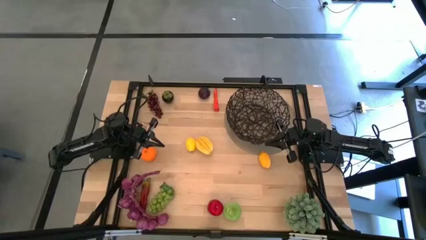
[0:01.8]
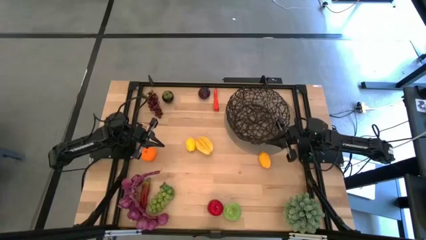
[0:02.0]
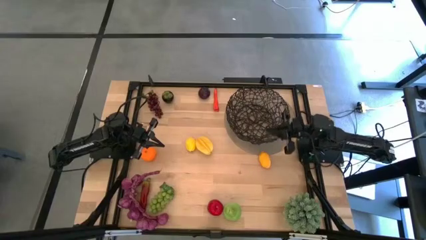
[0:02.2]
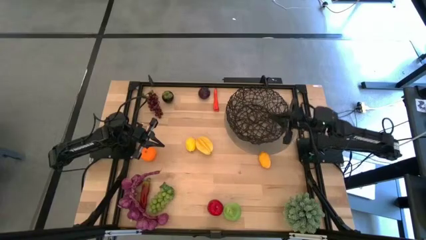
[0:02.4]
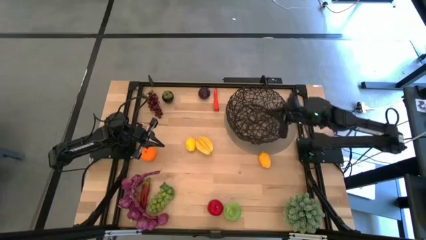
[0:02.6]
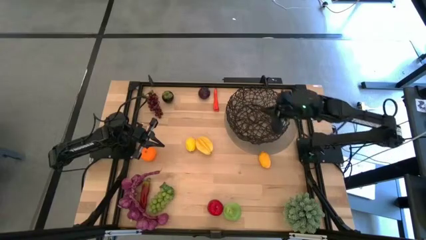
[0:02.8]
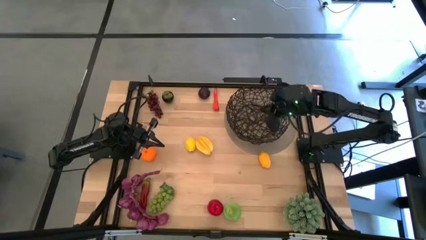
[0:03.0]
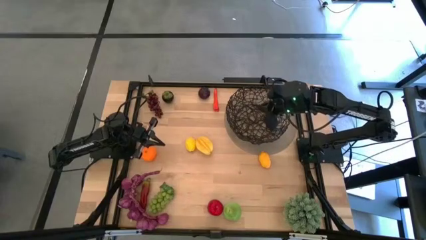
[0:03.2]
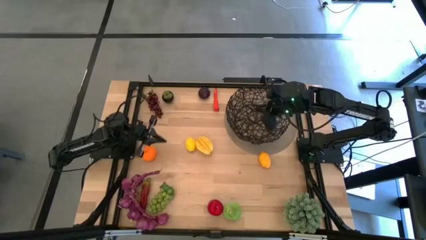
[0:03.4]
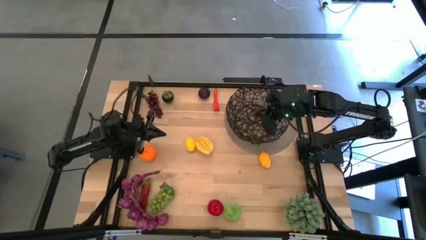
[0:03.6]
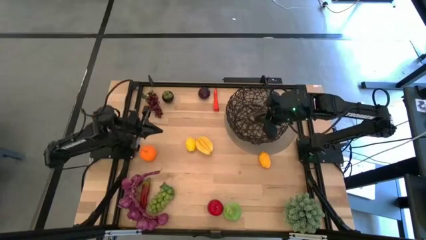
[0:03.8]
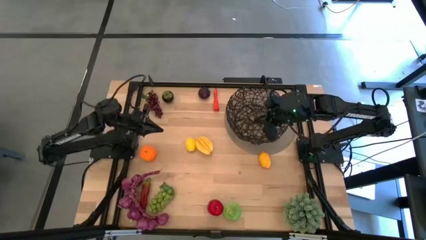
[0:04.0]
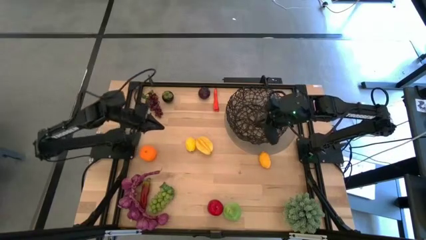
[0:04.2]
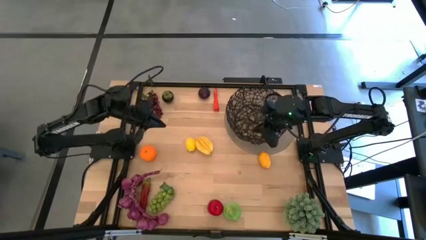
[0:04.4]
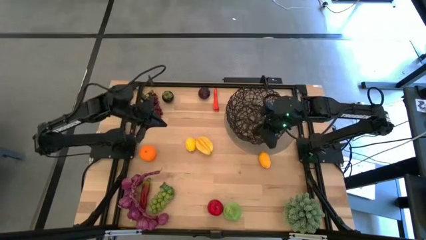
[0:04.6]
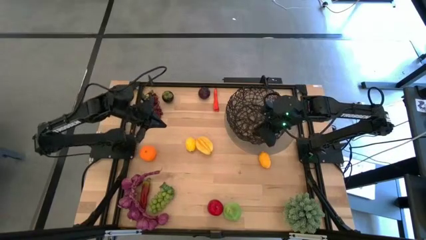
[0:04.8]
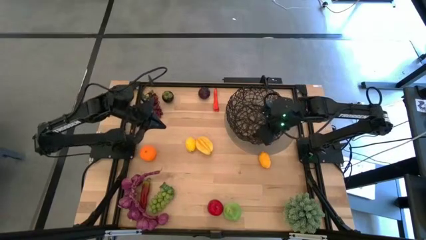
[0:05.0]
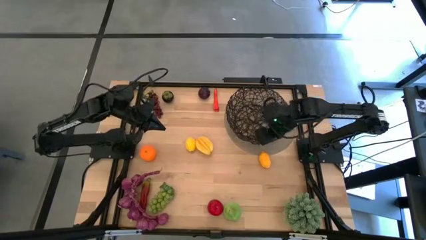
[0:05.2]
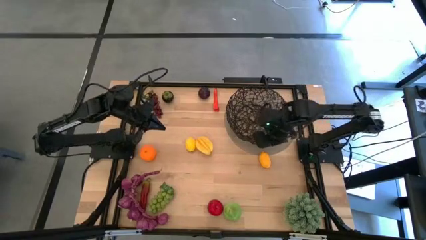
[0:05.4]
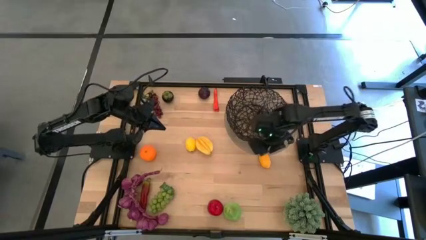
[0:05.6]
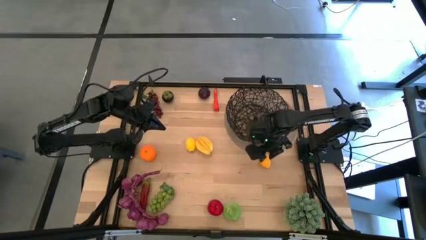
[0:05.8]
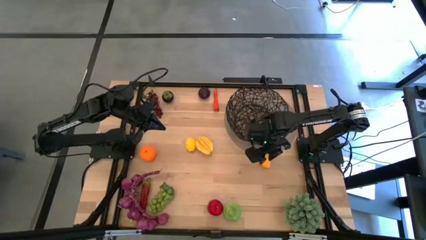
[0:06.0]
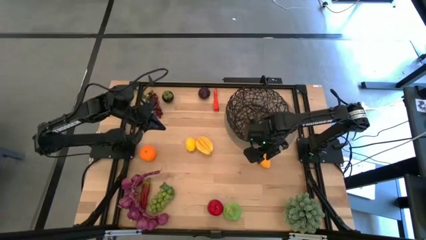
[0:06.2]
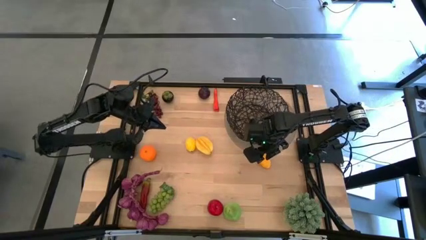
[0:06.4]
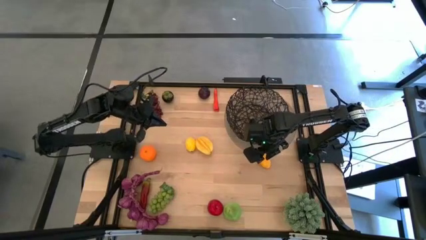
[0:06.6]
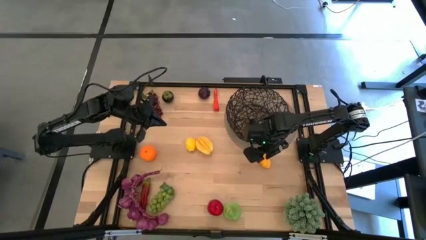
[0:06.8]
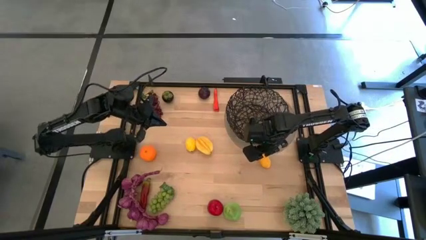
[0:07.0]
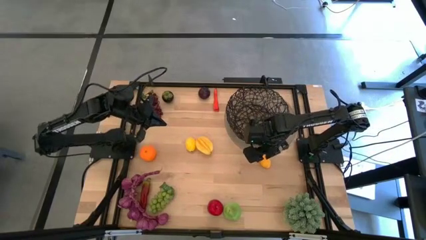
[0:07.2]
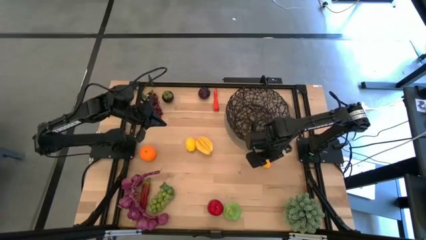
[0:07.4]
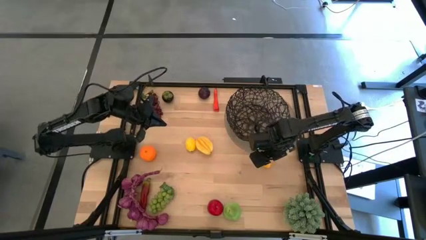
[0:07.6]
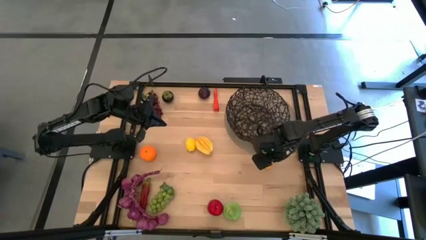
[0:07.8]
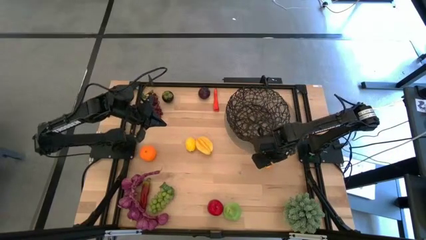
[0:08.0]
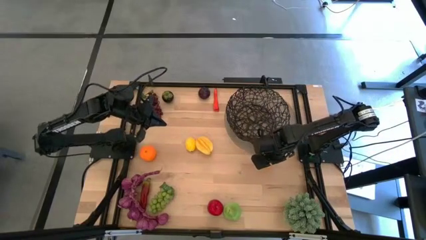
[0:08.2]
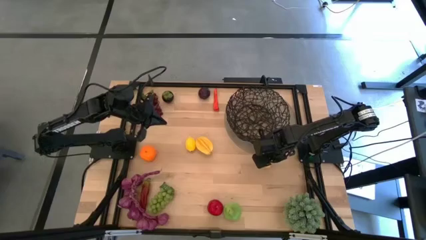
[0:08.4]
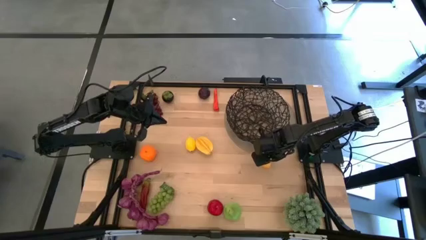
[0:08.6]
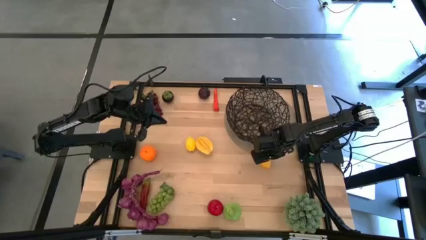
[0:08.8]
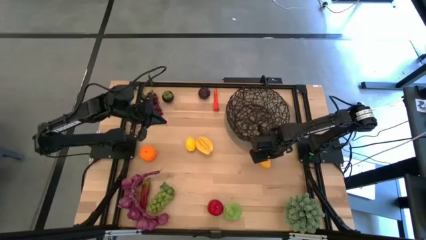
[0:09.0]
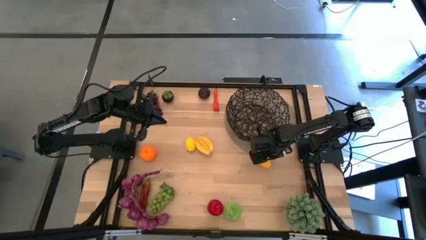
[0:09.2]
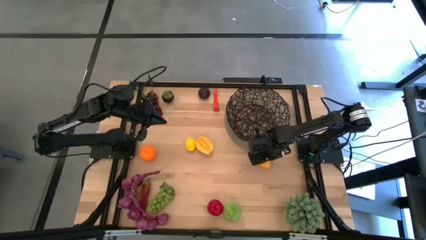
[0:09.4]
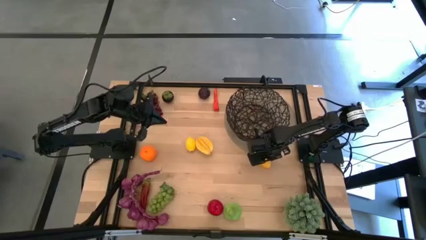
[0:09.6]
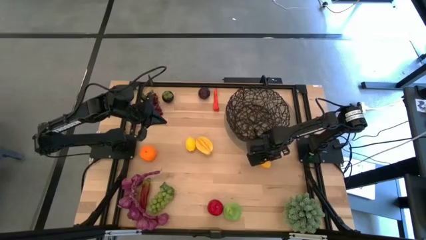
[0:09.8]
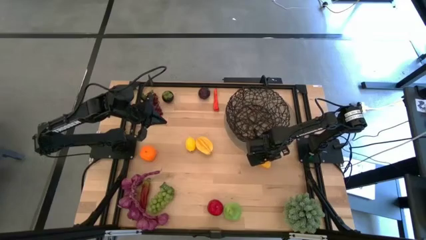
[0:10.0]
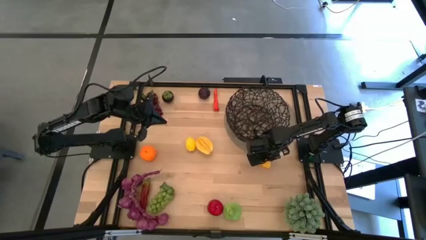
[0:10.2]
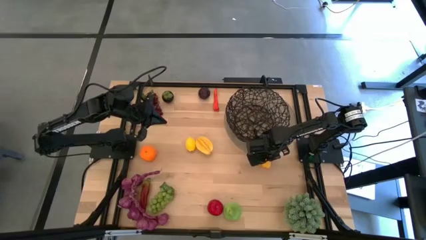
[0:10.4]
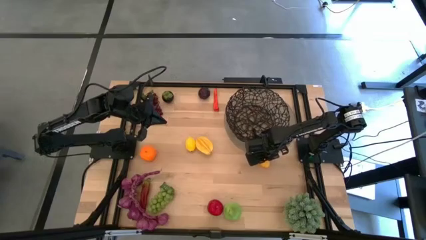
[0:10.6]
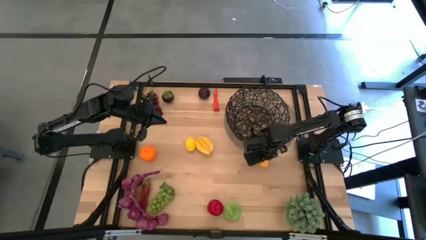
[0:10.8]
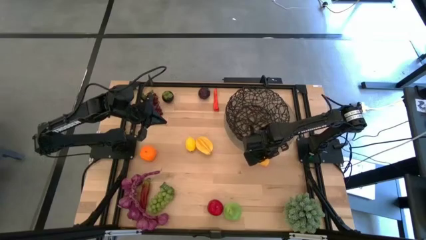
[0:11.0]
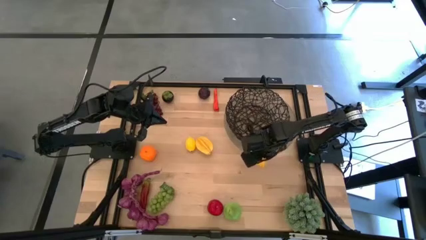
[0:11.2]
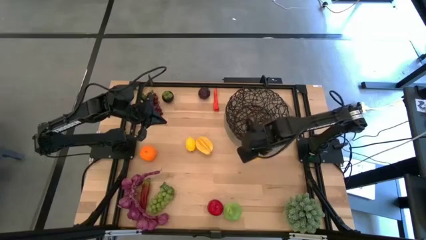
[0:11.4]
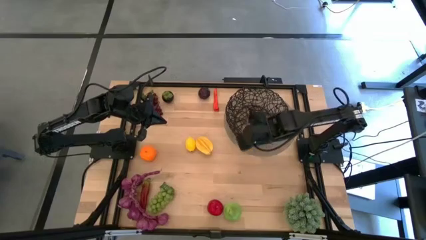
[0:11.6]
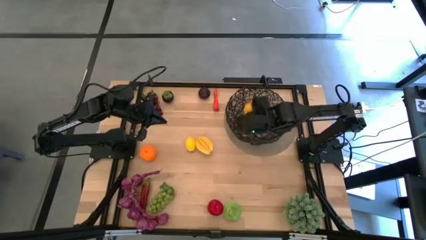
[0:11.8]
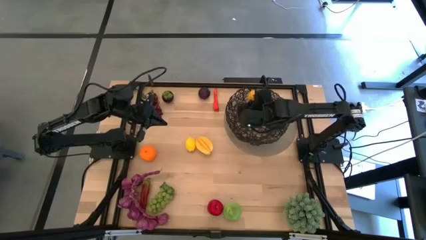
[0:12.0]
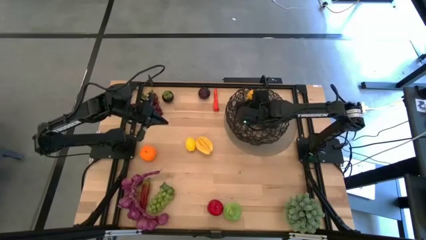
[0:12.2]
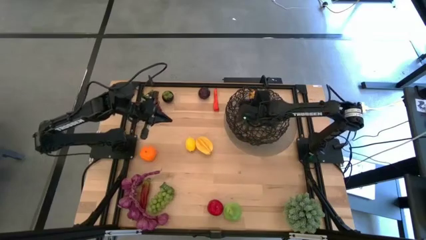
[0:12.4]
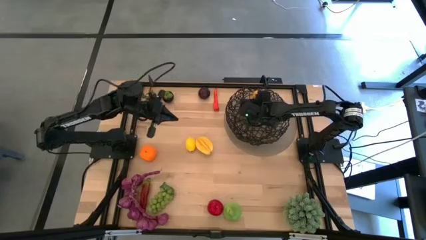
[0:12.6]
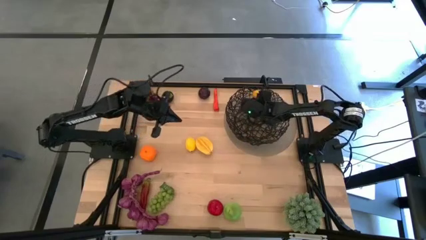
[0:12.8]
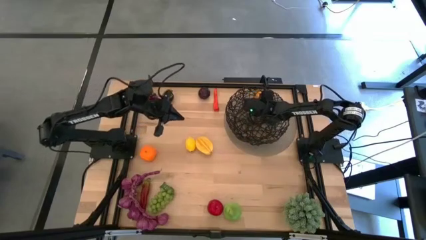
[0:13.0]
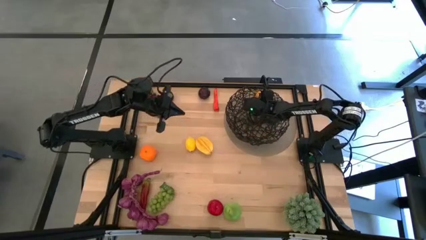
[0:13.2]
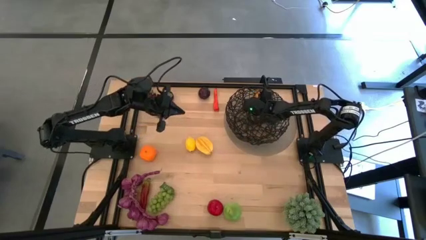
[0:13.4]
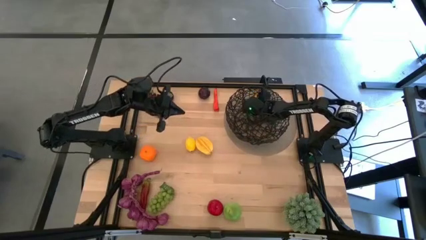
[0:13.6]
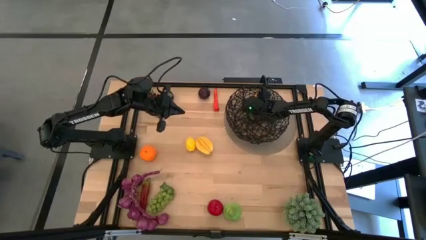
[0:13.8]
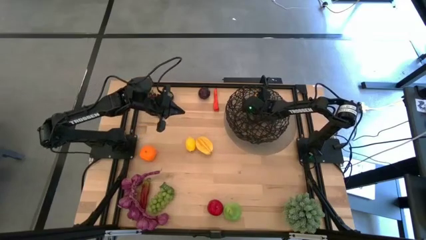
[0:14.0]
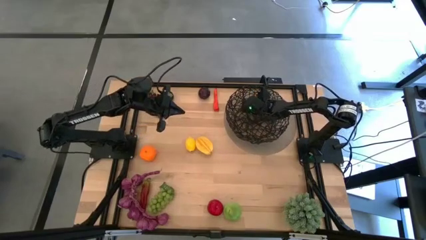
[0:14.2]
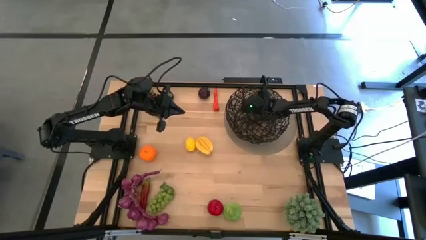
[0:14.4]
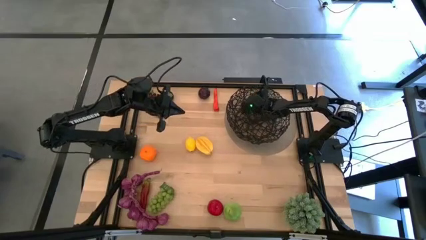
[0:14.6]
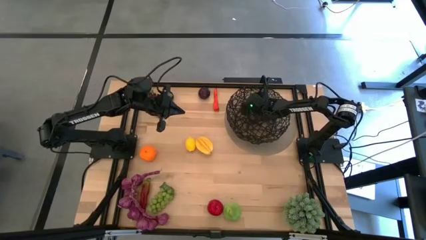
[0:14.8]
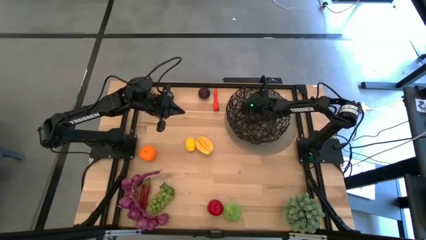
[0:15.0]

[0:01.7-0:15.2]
Task: Build produce basket
Put the lemon into the black wire basket

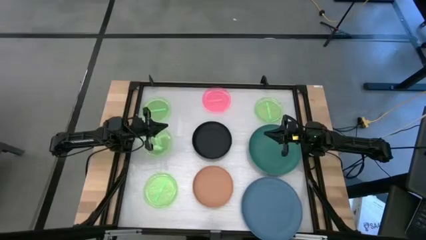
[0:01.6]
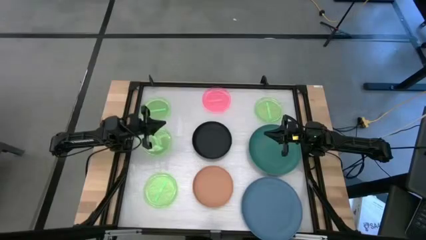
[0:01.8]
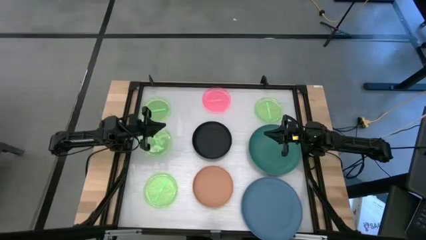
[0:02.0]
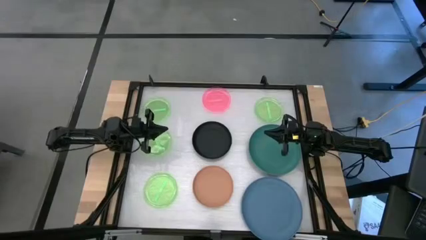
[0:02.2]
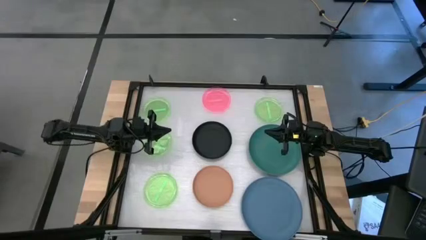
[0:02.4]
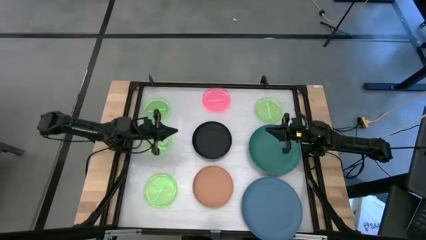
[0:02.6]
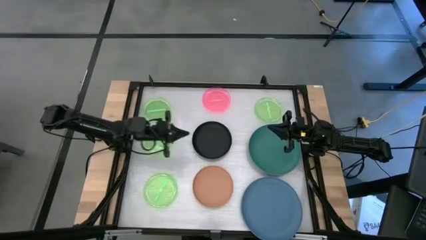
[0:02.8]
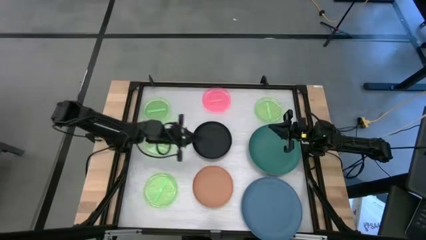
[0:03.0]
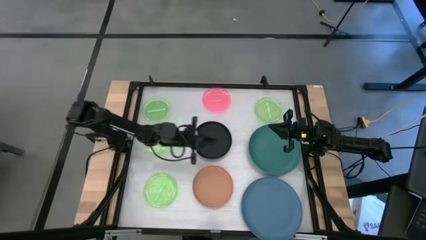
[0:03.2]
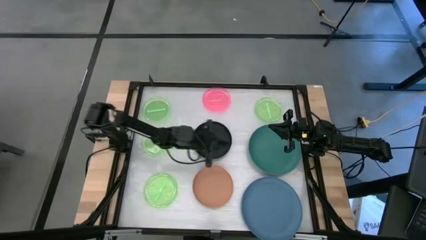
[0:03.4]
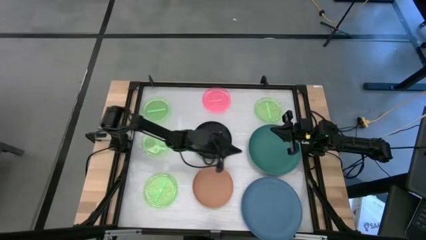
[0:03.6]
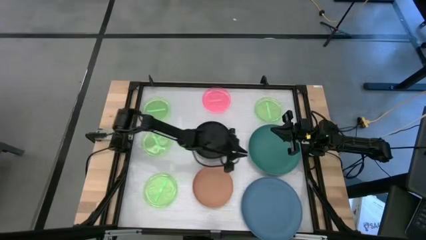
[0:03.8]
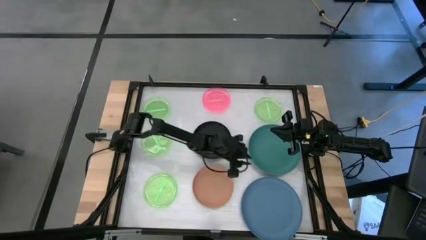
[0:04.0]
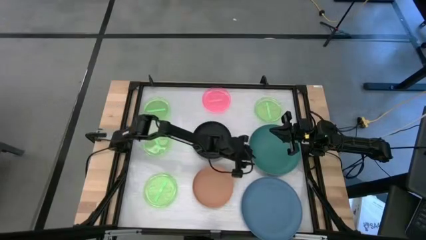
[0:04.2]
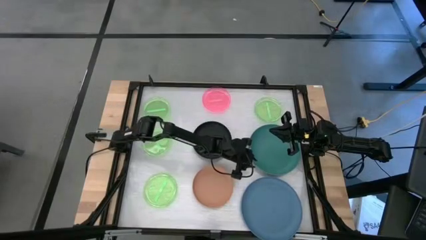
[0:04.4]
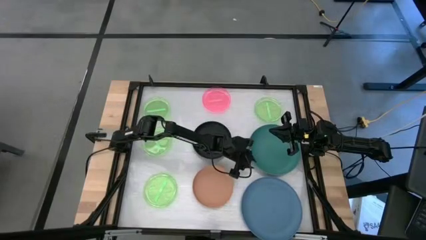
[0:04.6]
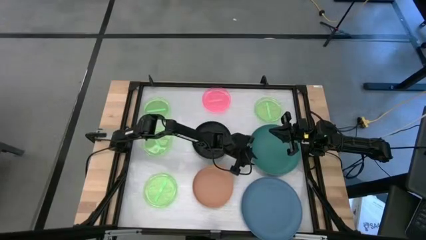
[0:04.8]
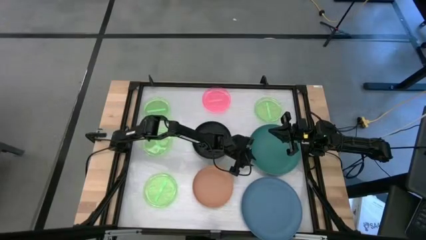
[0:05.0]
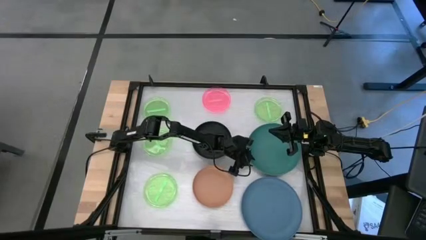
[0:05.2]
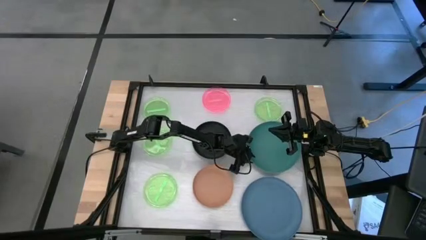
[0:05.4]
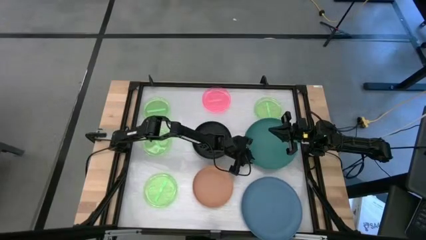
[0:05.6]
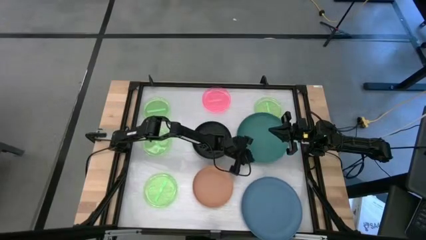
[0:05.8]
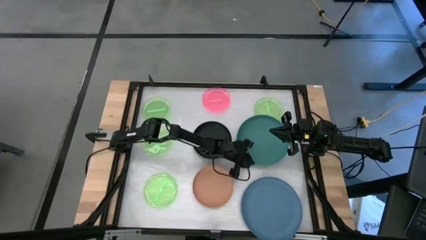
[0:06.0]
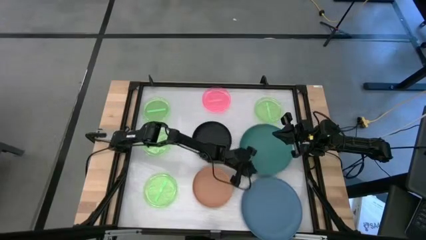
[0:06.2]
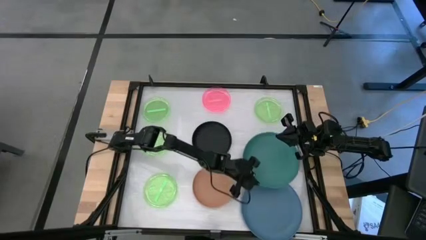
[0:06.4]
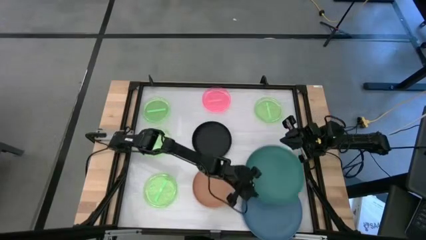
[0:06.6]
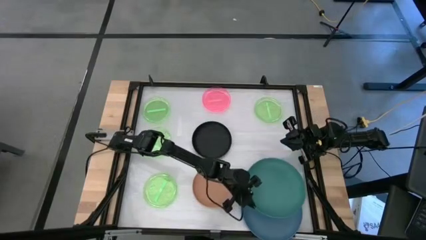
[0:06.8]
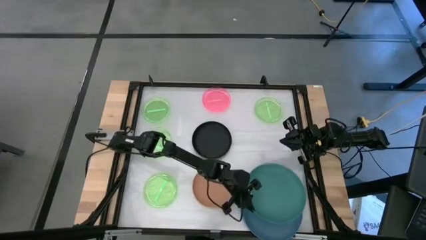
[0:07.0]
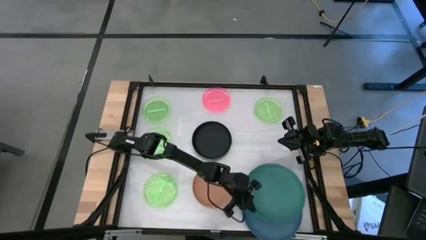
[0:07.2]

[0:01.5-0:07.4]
Task: Stack plastic plates
Stack the green plate on top of the blue plate
